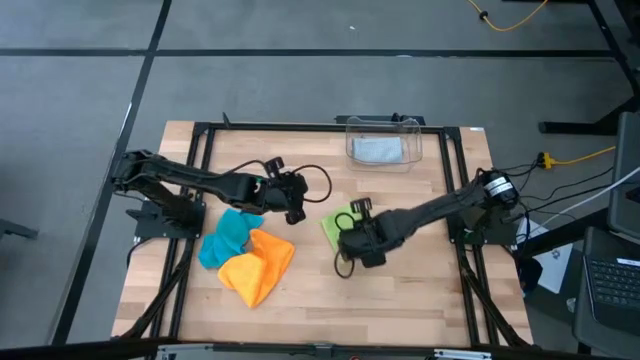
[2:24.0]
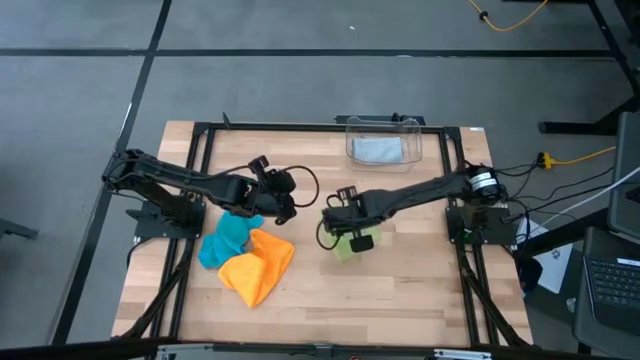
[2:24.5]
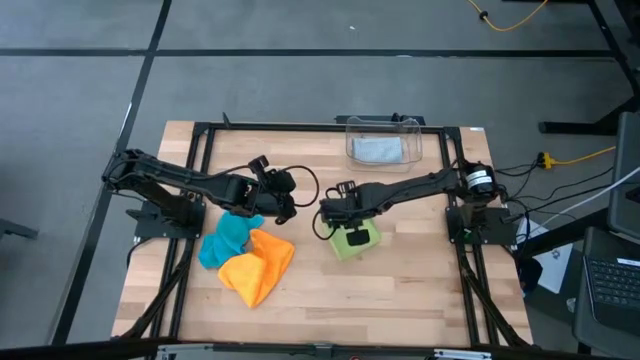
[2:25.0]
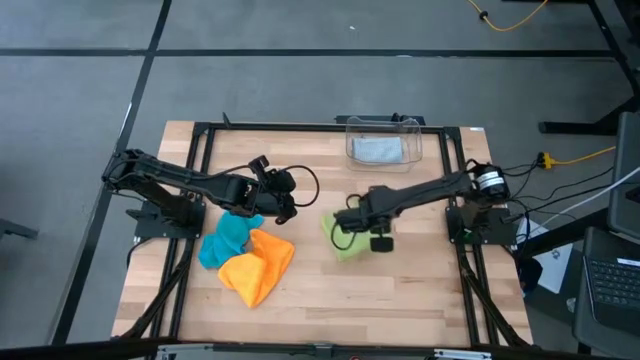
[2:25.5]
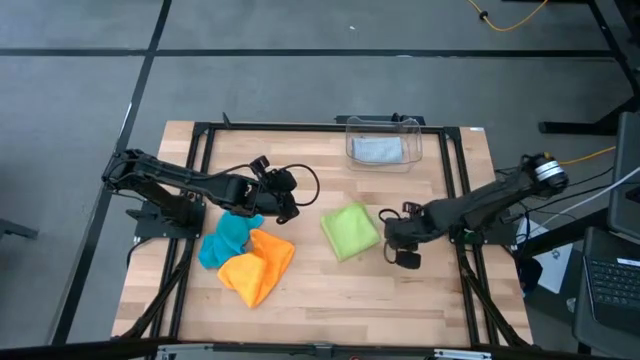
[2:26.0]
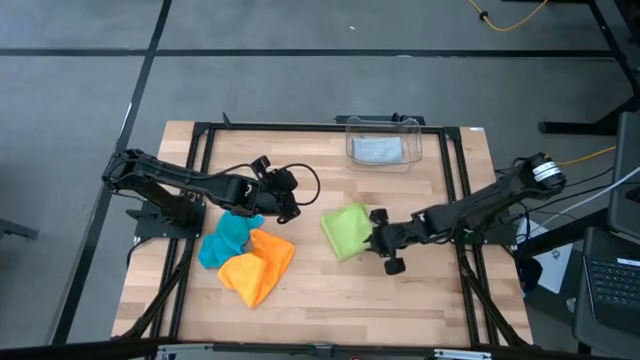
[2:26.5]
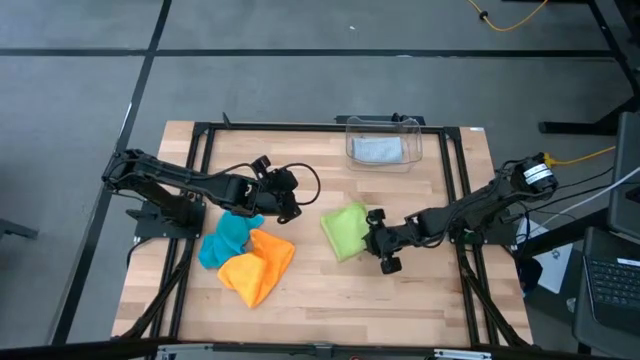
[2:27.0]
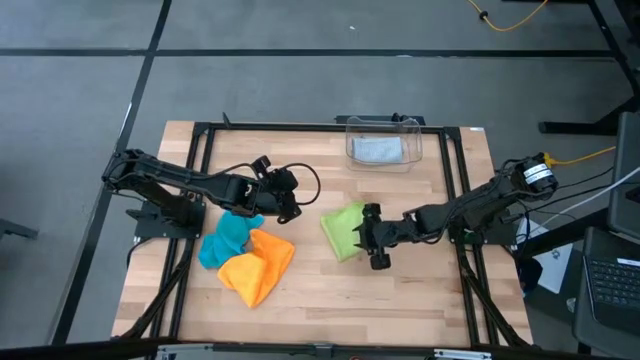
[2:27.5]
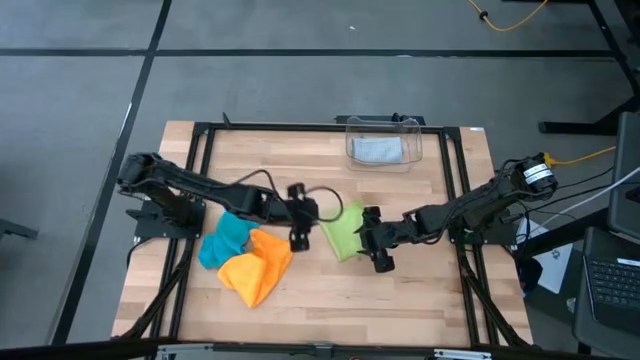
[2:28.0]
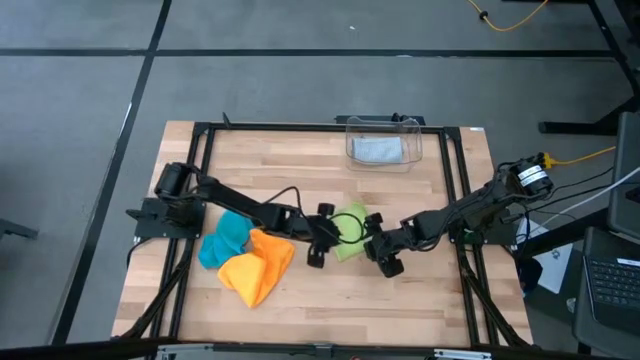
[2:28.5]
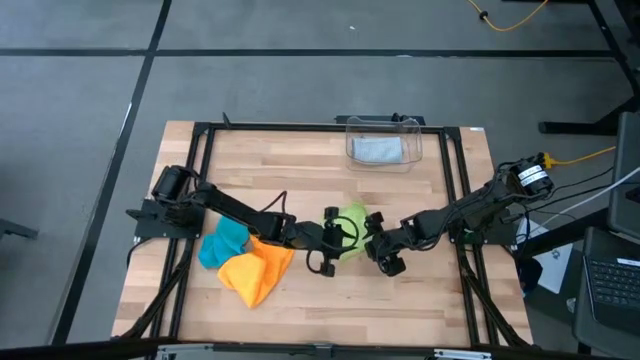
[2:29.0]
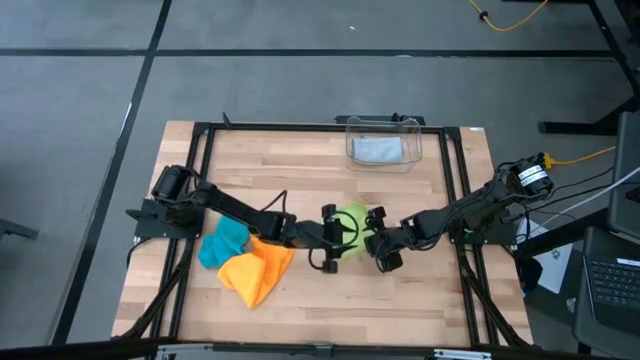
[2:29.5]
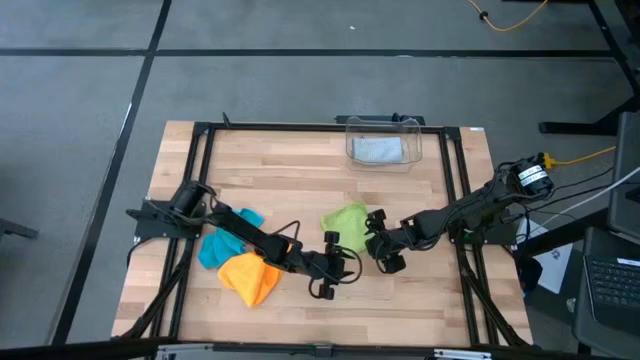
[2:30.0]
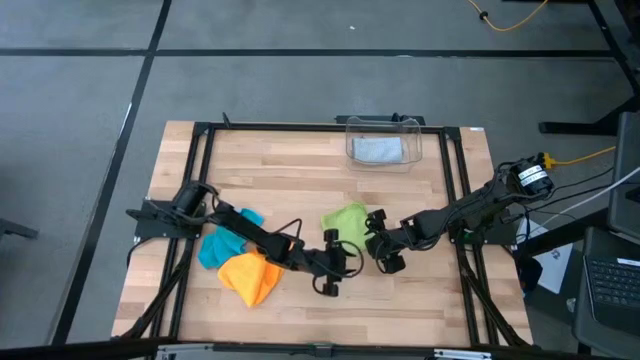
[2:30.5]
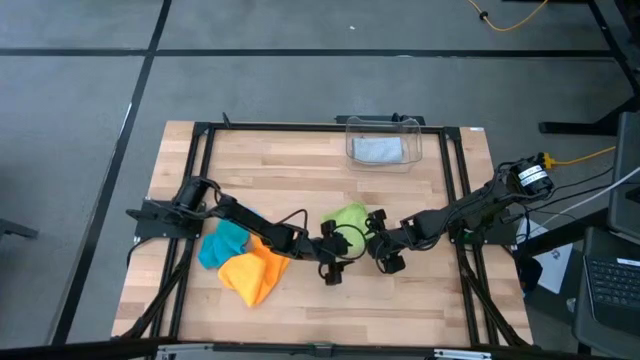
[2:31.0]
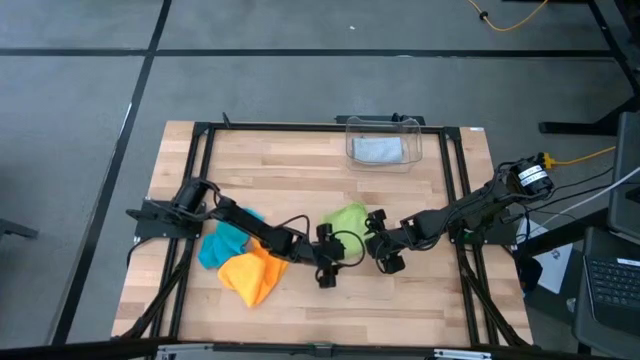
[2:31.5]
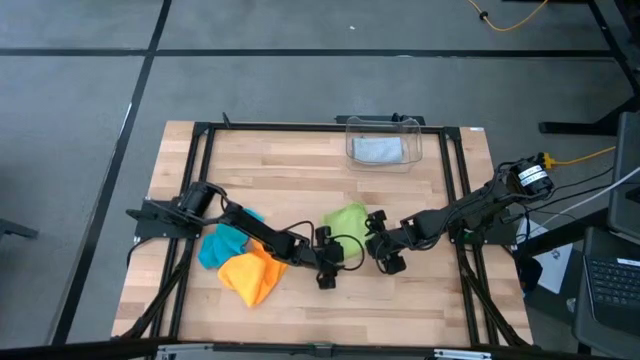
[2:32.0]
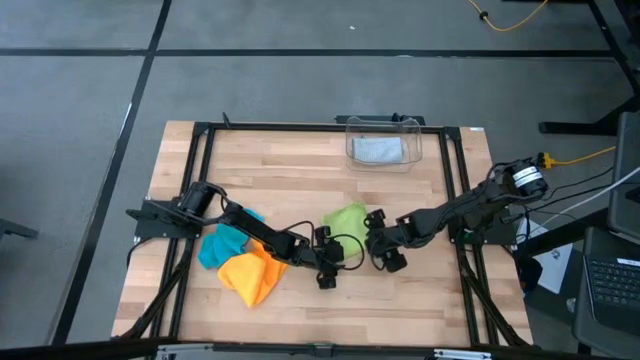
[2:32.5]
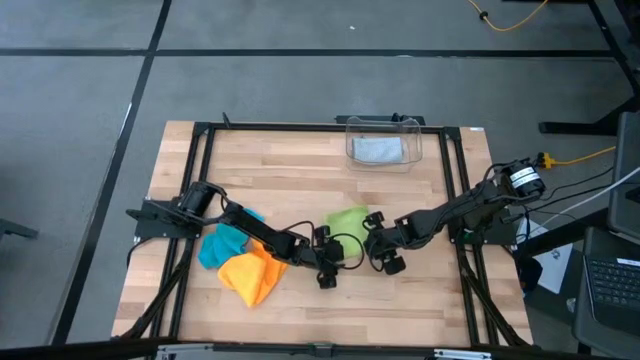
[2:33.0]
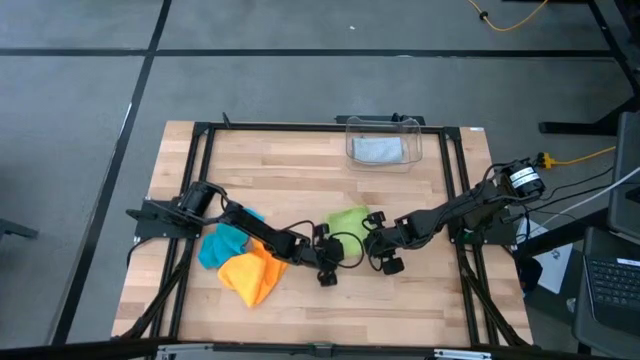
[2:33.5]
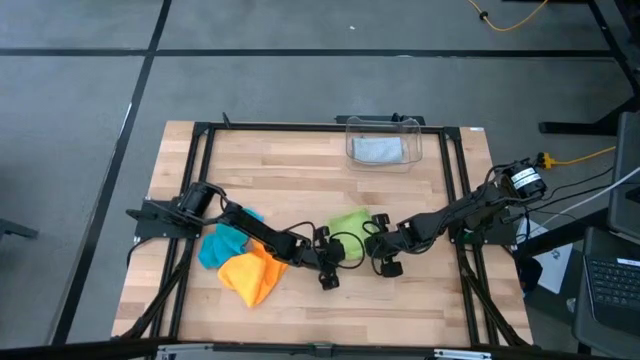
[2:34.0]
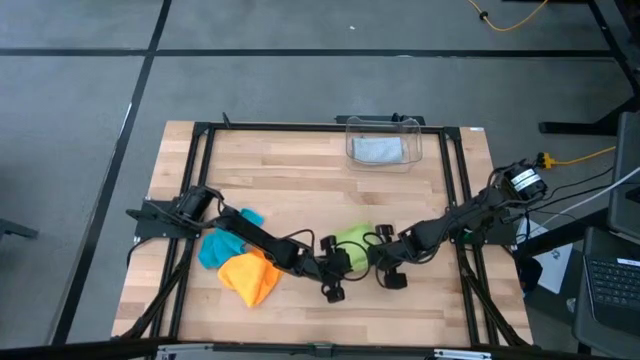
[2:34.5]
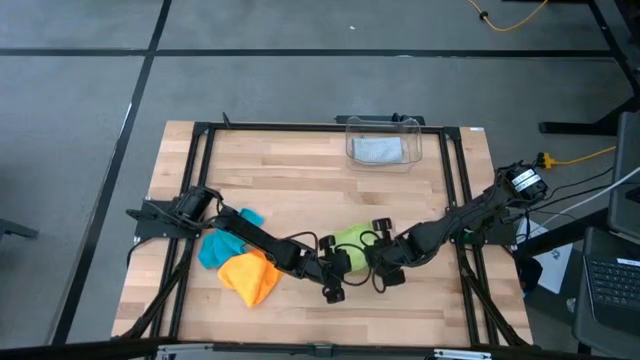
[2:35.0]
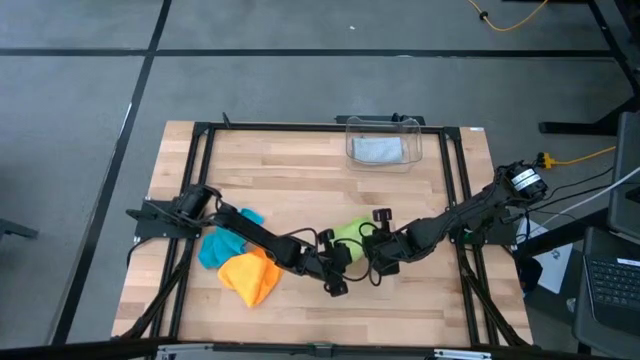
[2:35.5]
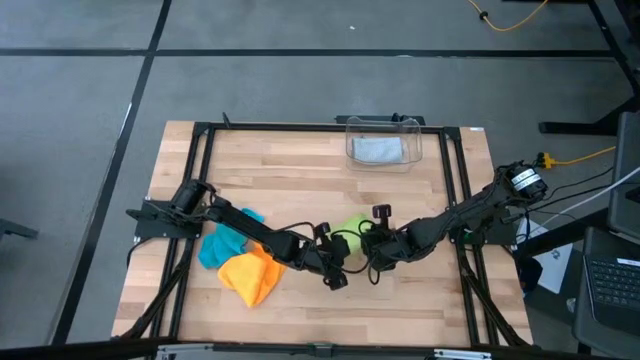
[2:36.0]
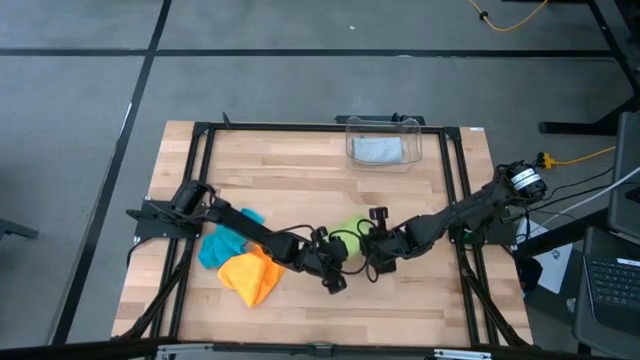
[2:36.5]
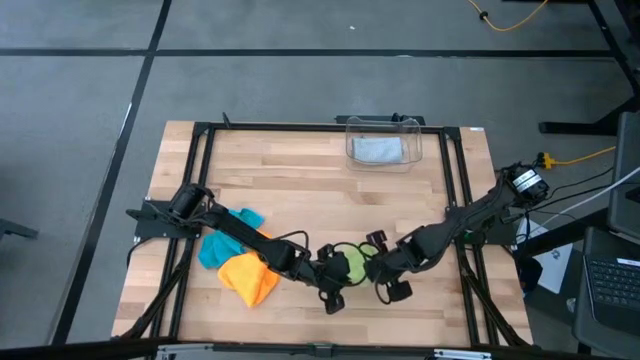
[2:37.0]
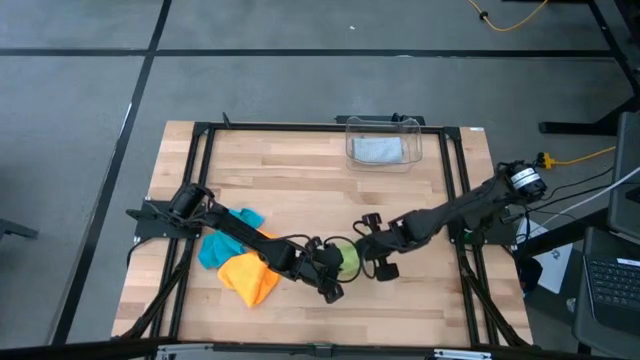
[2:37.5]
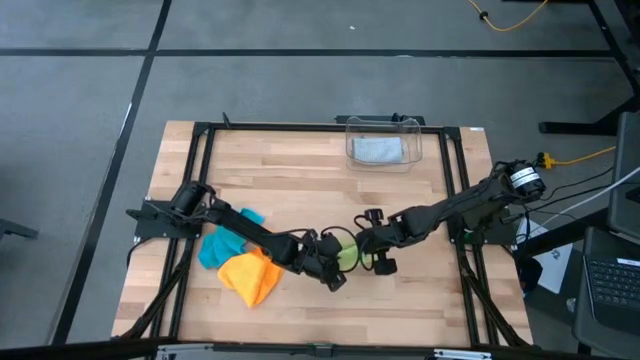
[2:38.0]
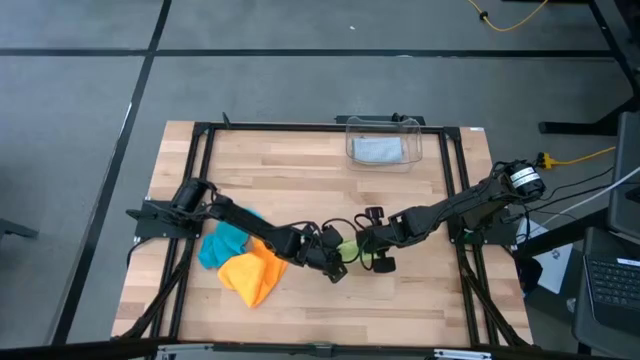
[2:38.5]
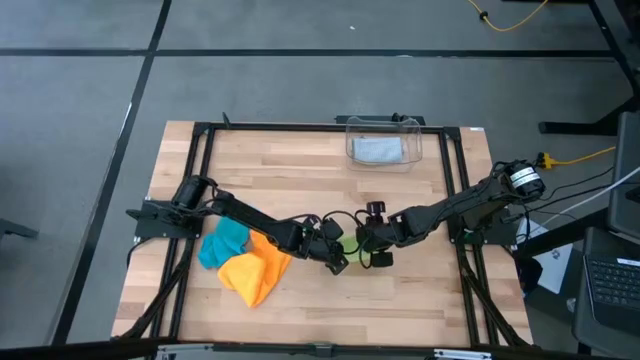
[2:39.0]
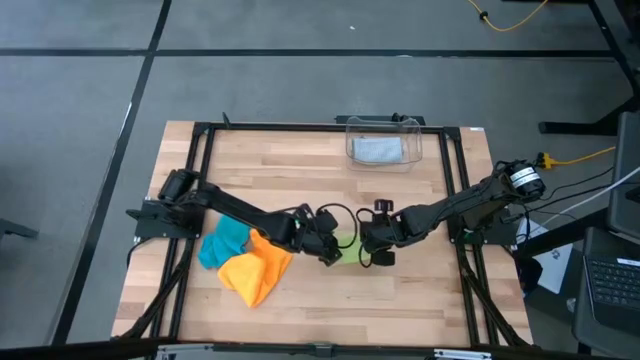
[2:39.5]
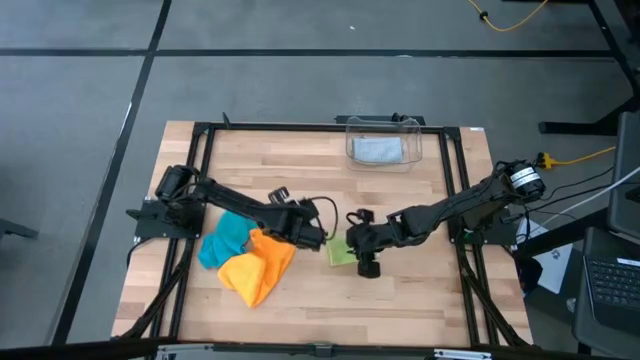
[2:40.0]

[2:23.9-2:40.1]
Task: Fold microfiber towels
Fold the green microfiber

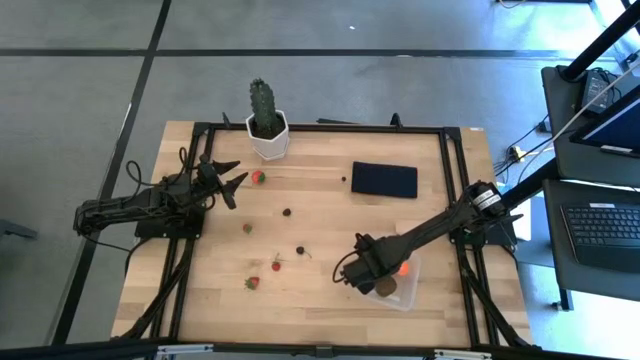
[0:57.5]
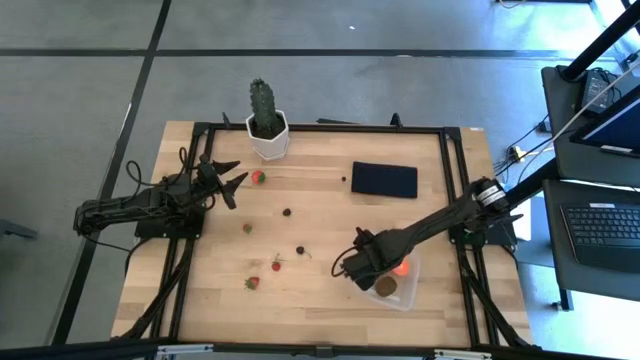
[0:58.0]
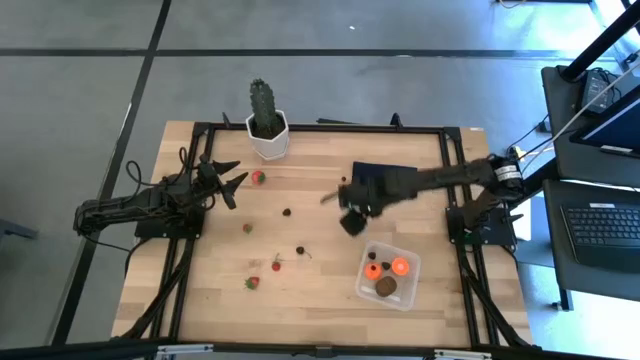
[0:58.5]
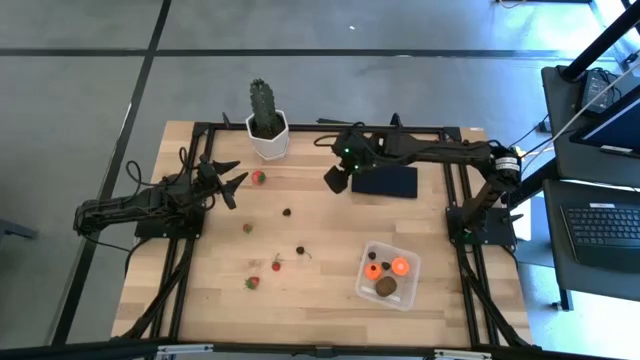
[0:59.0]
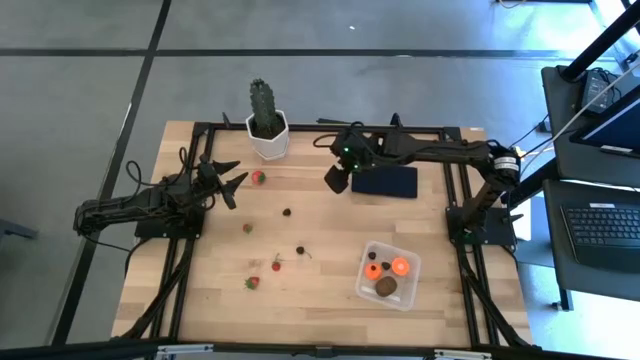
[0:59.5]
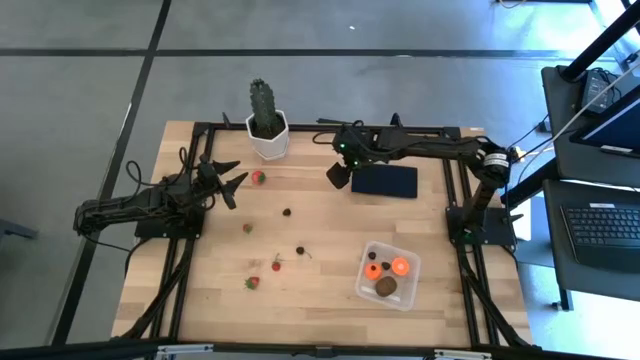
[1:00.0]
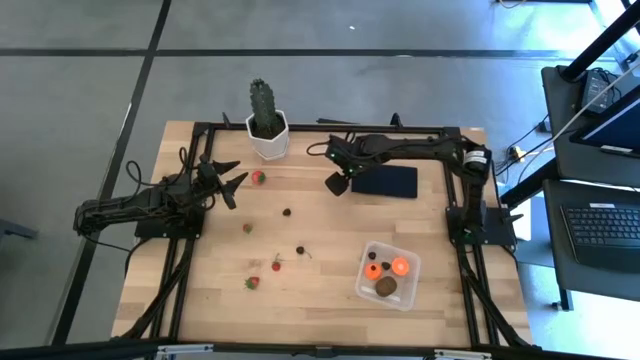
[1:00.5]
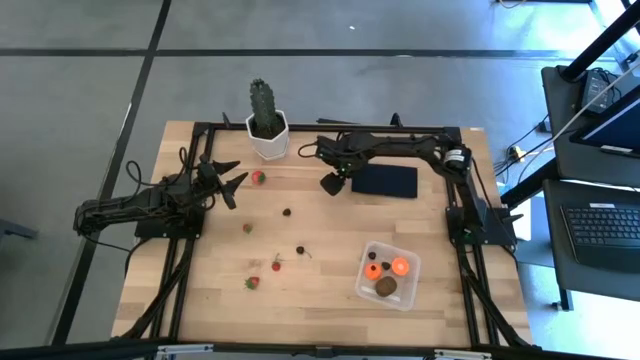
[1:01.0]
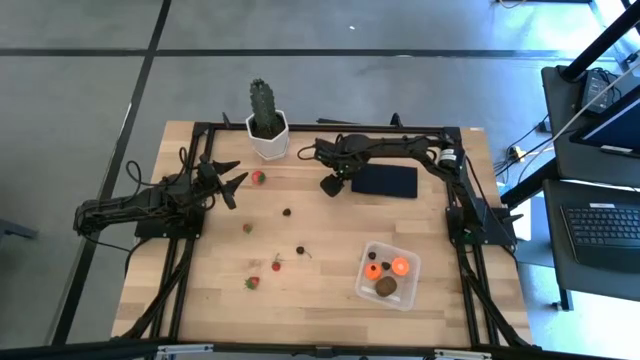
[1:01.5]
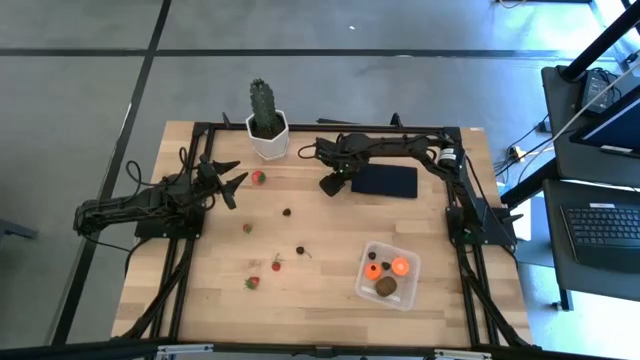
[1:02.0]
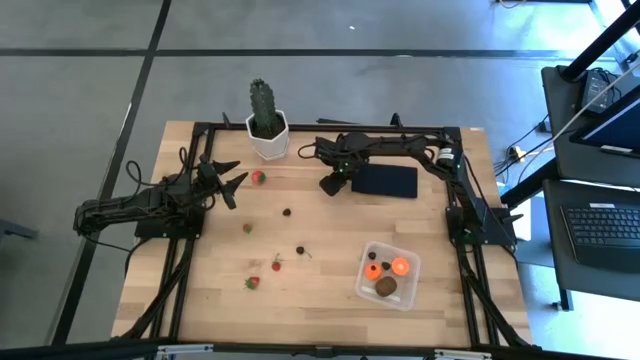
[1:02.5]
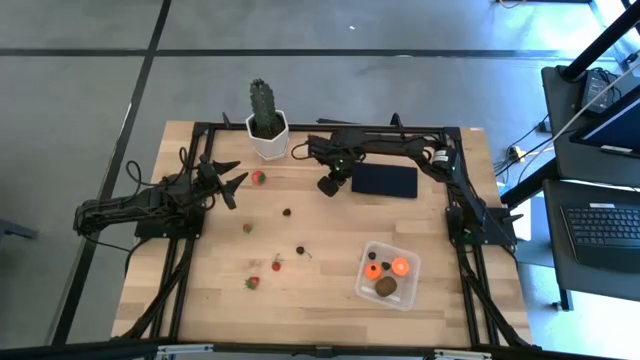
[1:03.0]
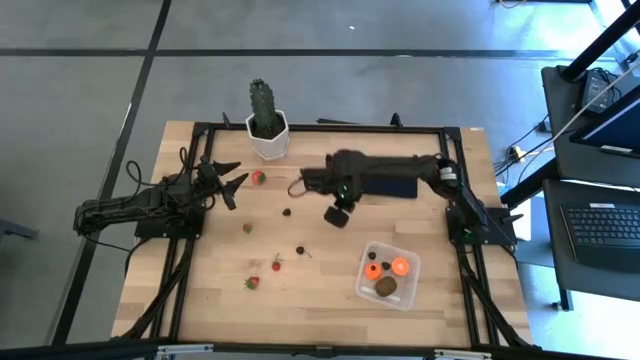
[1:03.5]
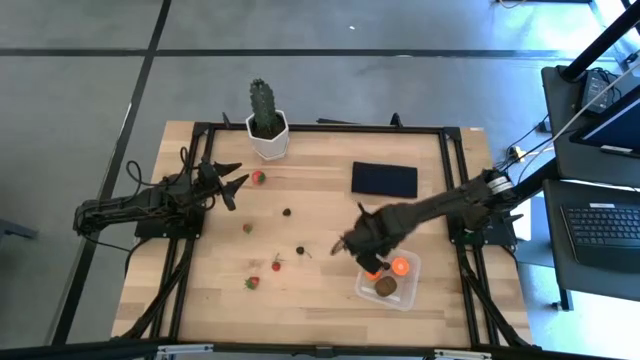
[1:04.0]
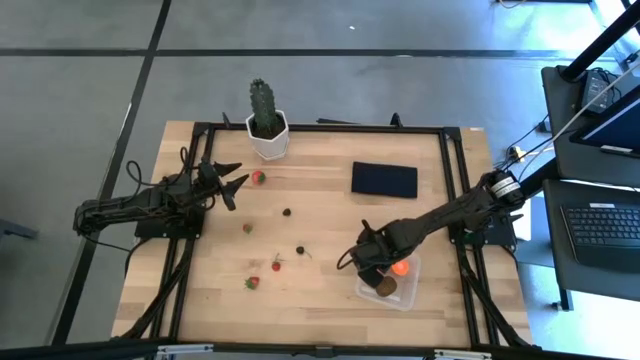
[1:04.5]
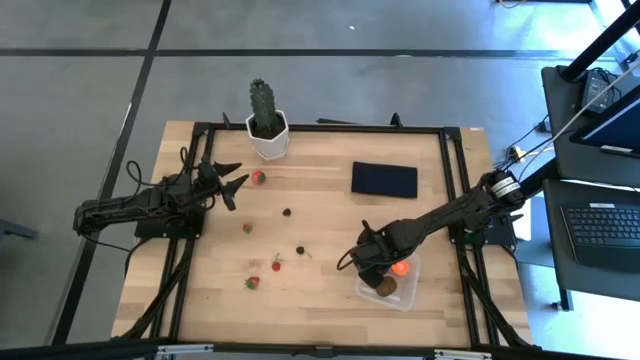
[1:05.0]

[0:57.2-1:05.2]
Task: Pick and placing Produce into tupperware
Put the blueberry into the transparent bin
